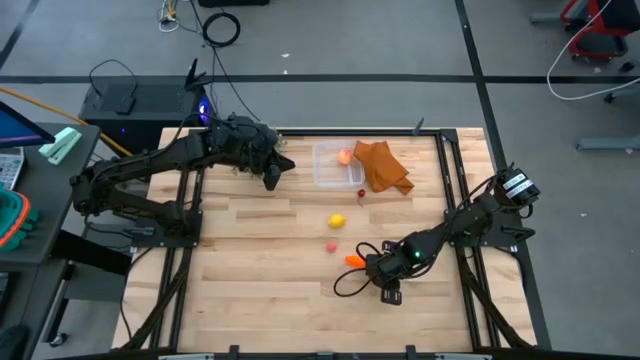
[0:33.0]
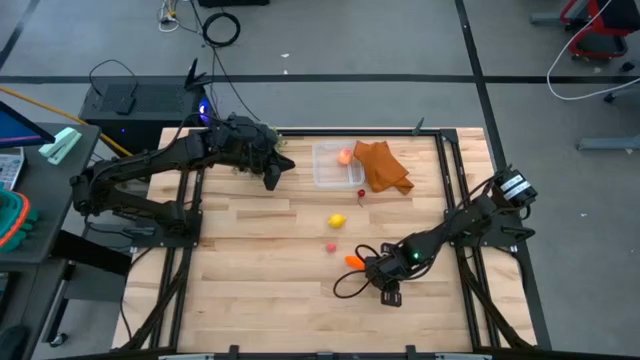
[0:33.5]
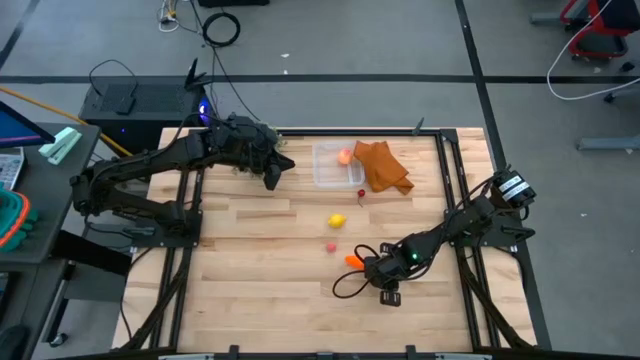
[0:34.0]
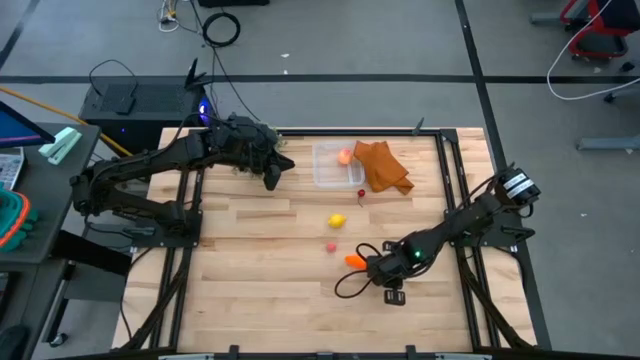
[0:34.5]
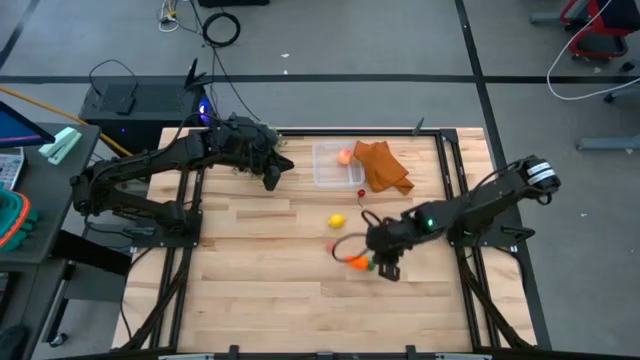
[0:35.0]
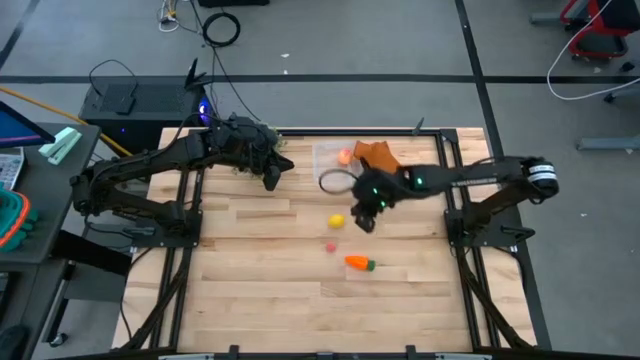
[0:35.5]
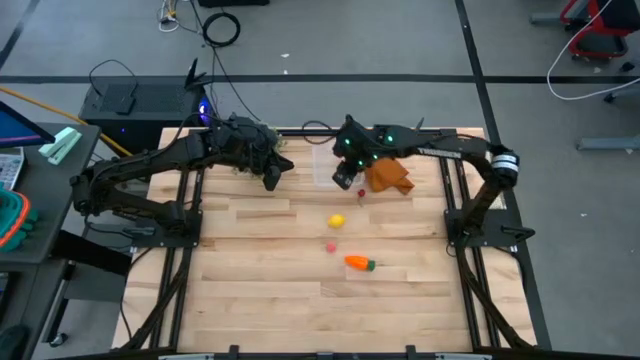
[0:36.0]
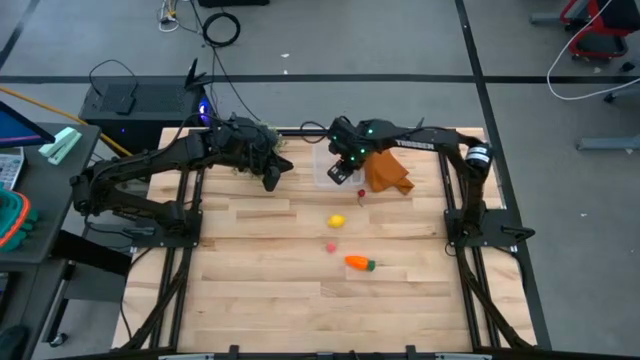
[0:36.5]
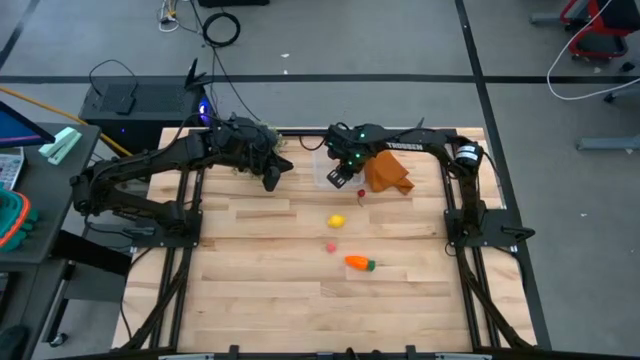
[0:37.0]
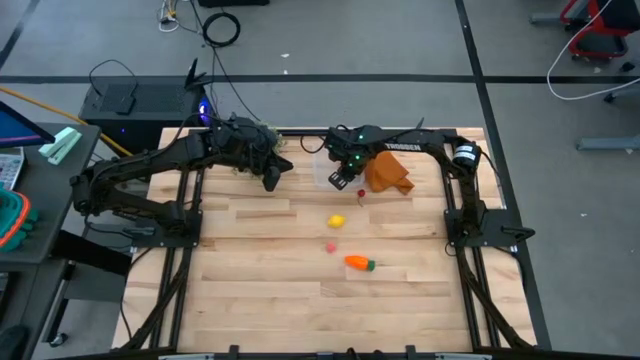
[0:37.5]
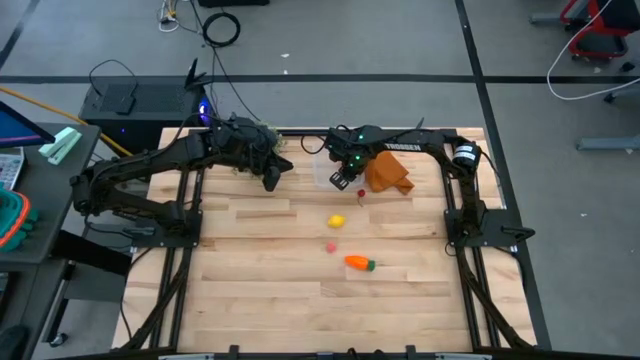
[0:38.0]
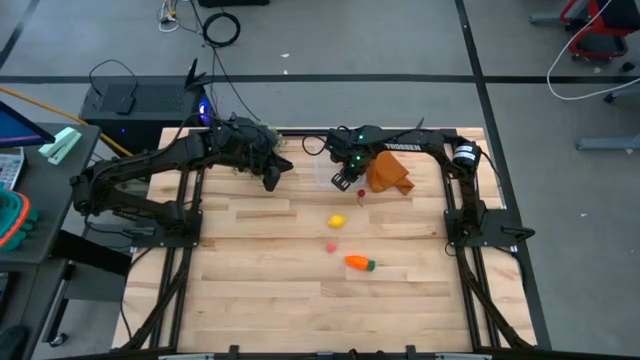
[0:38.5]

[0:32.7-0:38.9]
Task: Pick and placing Produce into tupperware
Put the black cherry into the transparent bin

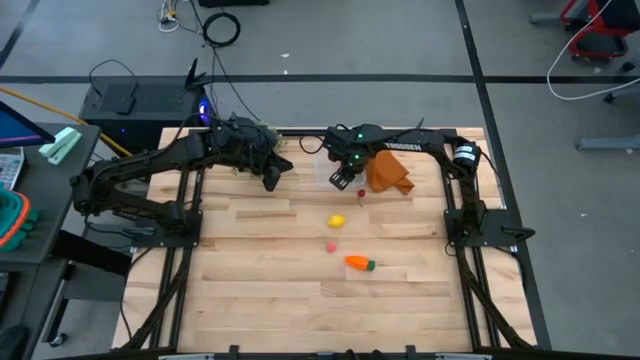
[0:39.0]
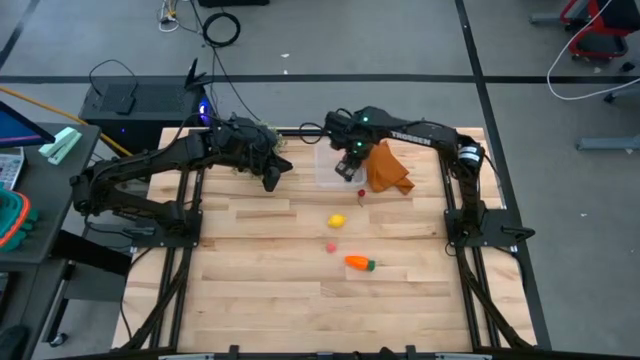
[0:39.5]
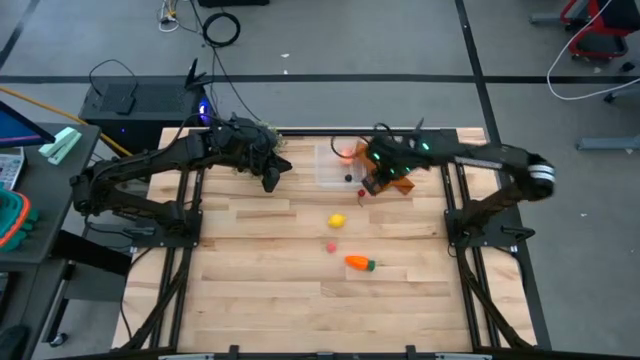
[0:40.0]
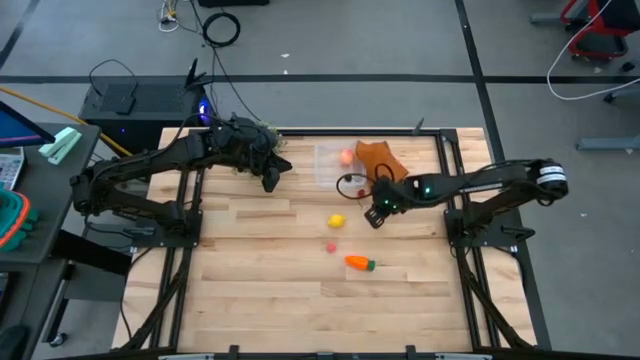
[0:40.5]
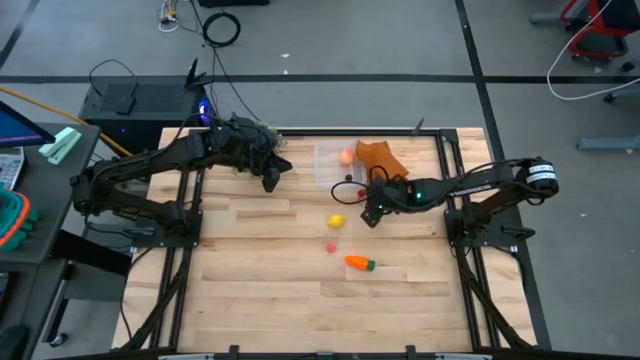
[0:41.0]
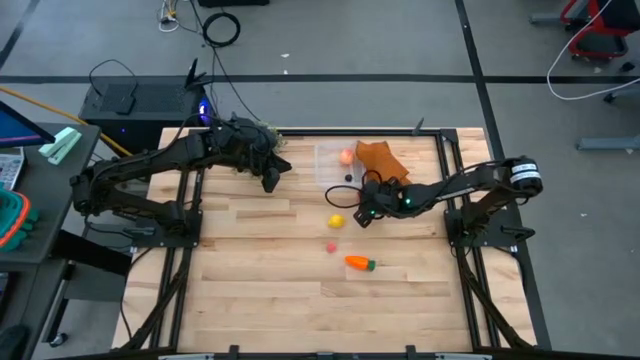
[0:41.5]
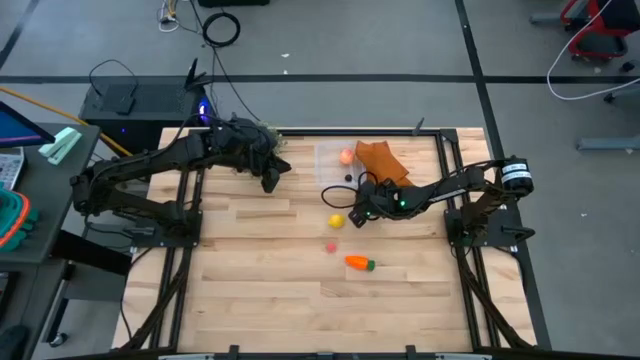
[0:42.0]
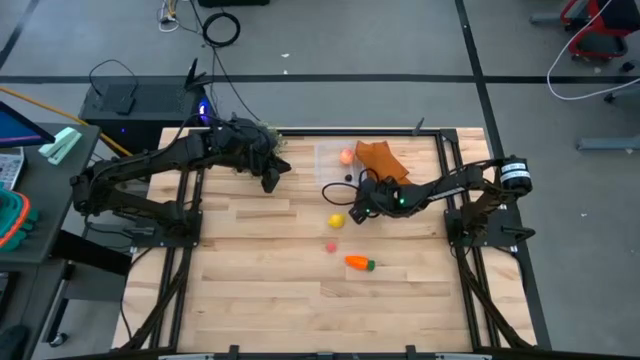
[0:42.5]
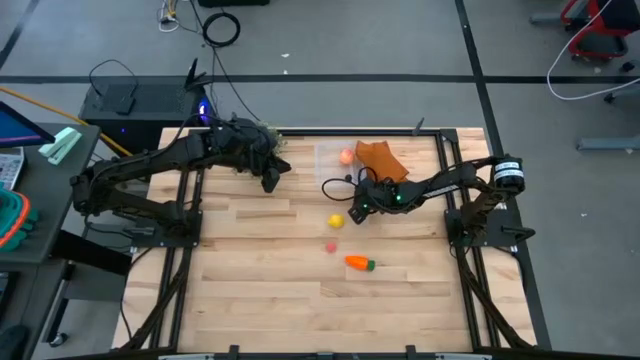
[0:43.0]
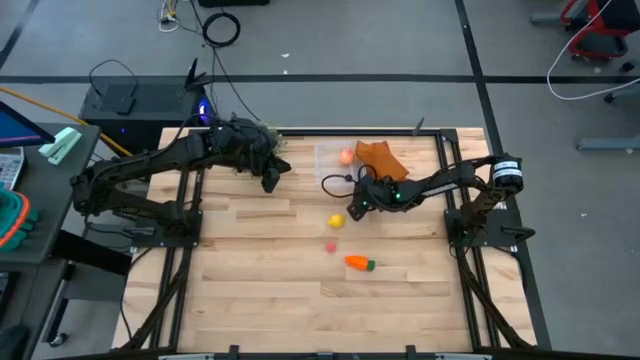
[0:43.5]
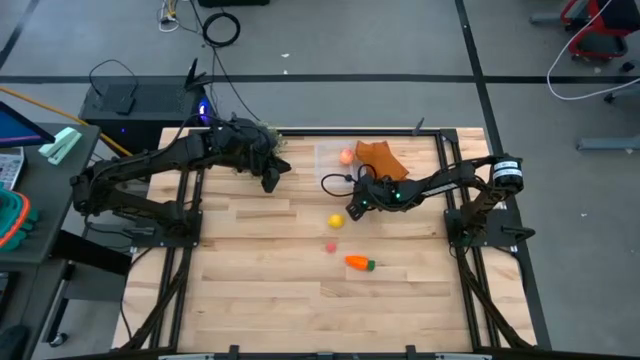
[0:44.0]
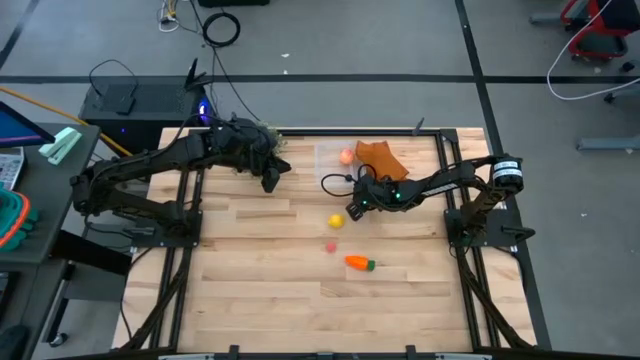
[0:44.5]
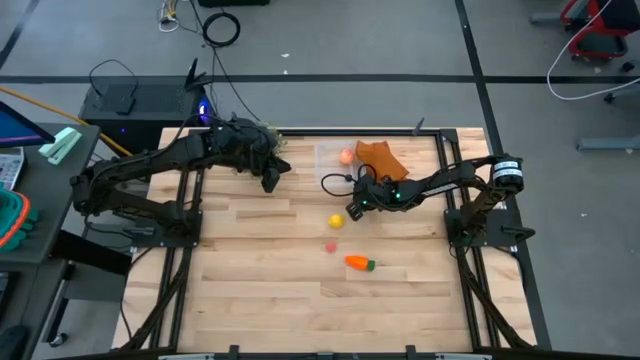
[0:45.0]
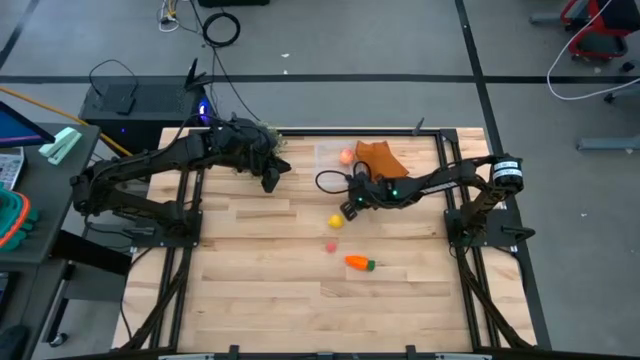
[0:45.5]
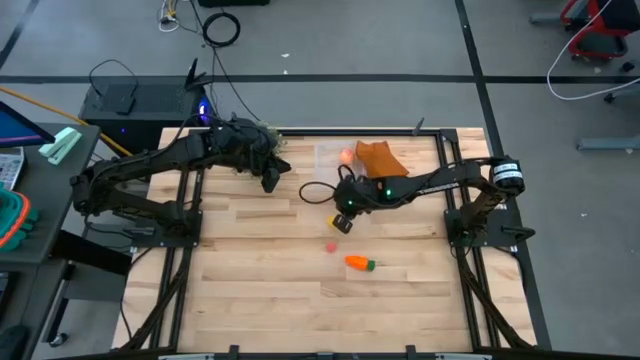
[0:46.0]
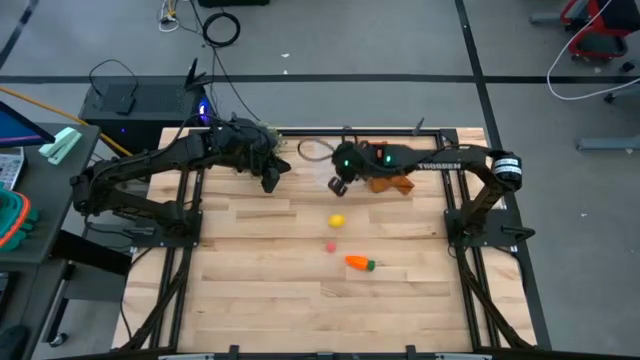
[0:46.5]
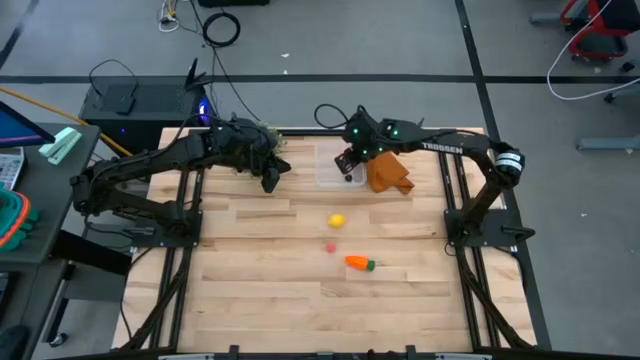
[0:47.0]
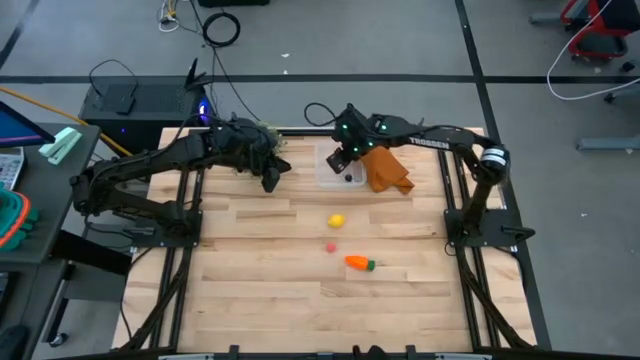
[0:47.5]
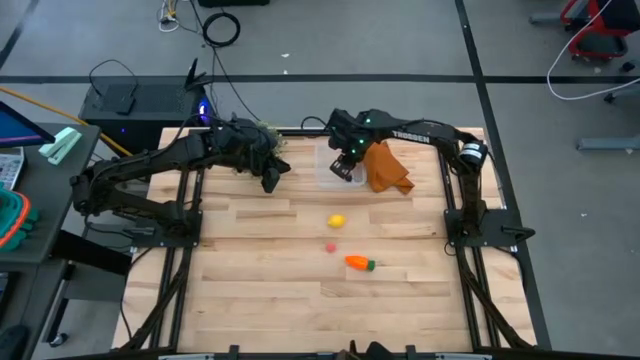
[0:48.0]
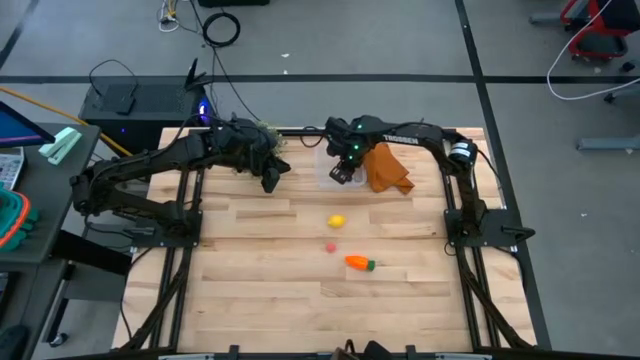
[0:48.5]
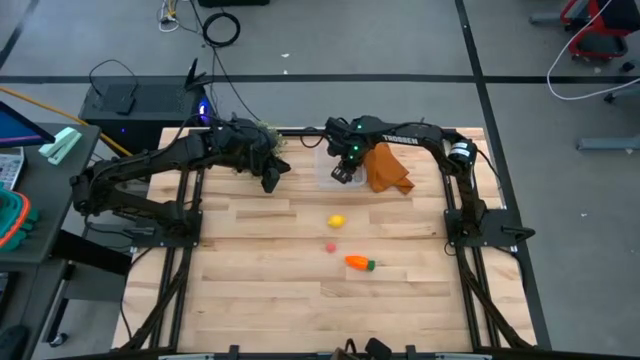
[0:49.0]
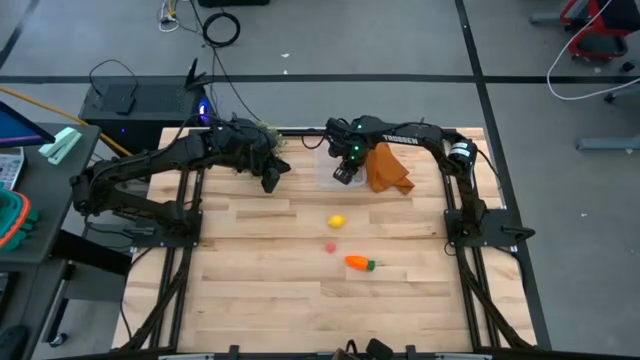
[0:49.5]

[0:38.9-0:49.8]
Put the red cherry into the transparent bin

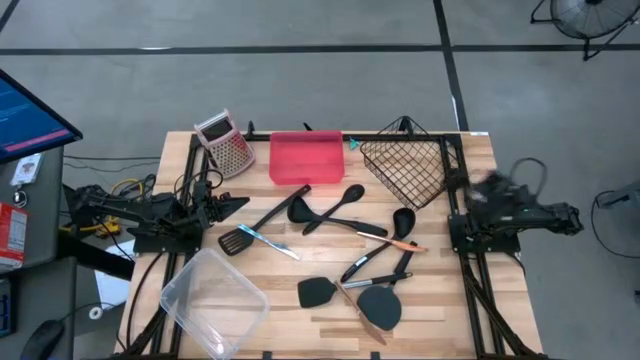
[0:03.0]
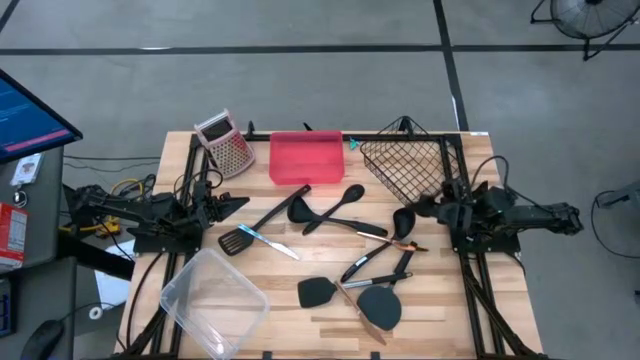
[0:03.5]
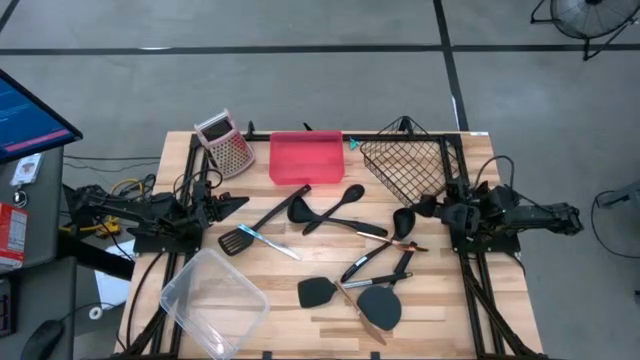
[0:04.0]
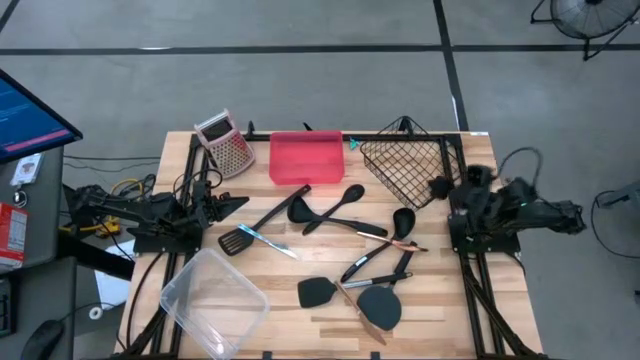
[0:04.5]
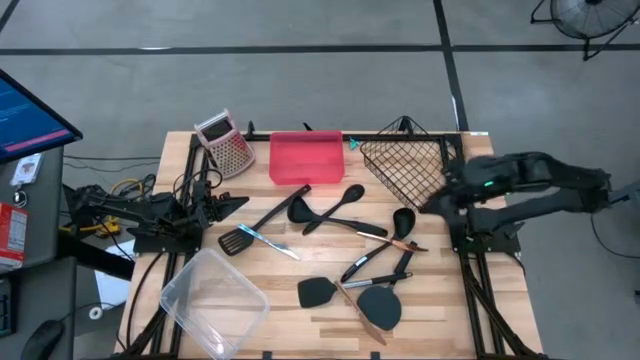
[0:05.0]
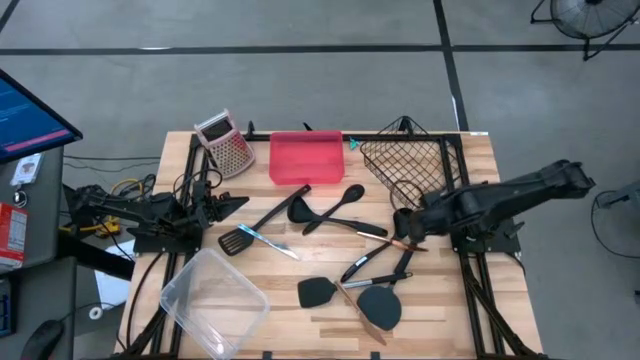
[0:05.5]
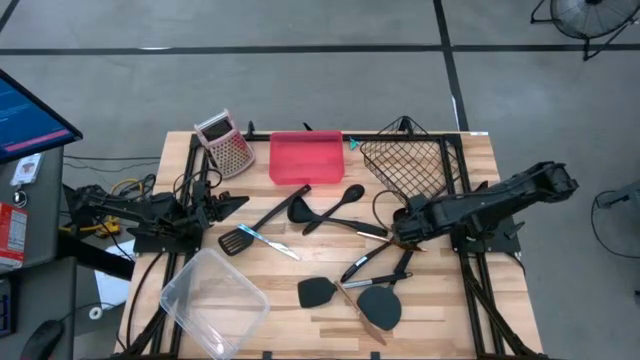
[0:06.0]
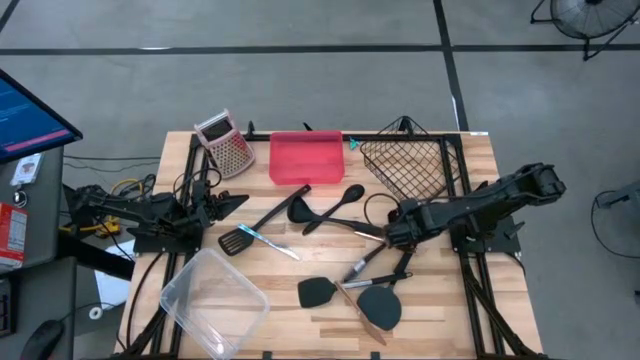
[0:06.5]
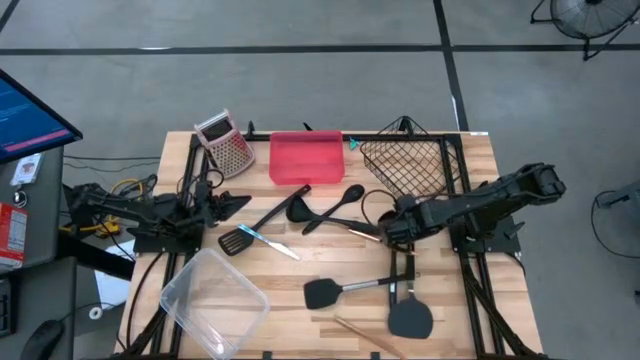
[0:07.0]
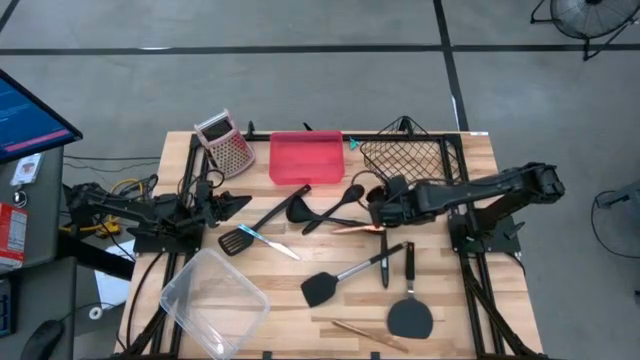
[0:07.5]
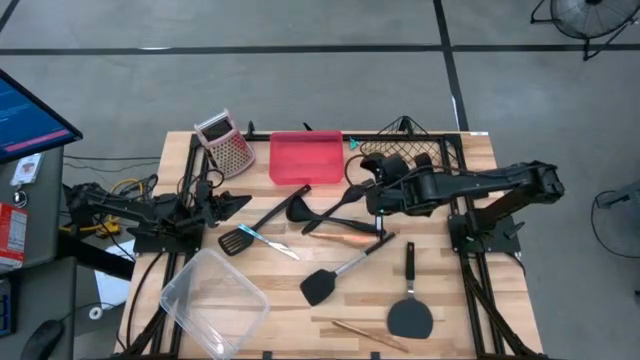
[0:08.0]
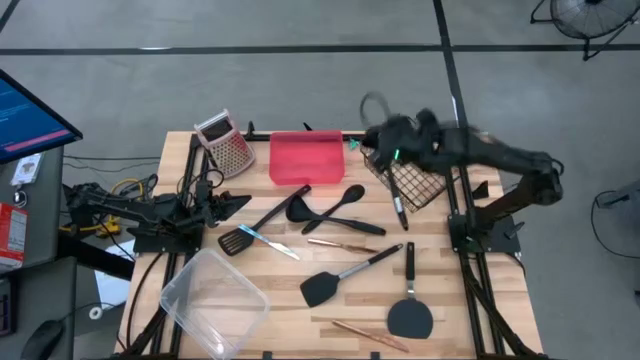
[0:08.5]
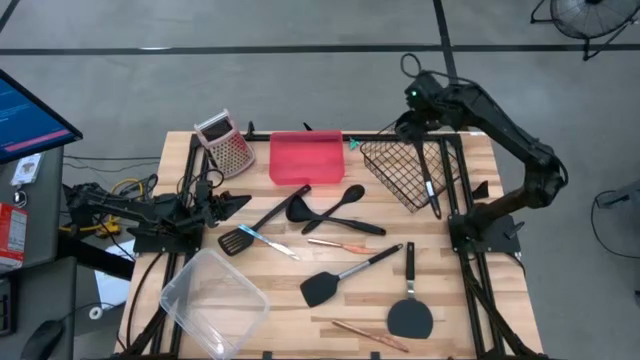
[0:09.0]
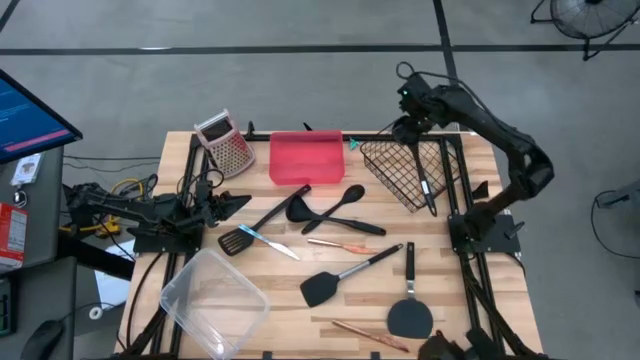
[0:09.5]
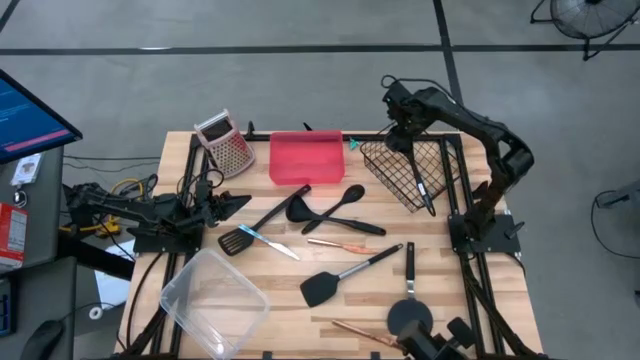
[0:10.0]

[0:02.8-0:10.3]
Task: Pick & Place Kitchen Items
Put the black ladle into the wire basket
